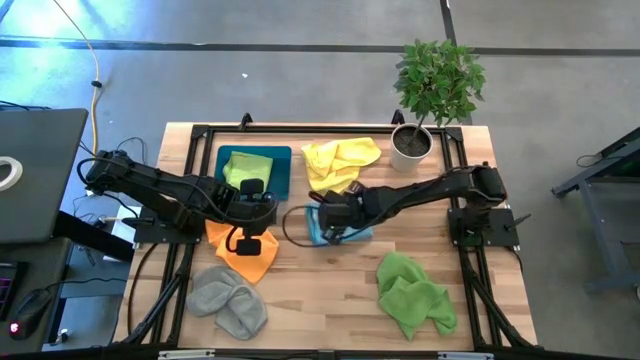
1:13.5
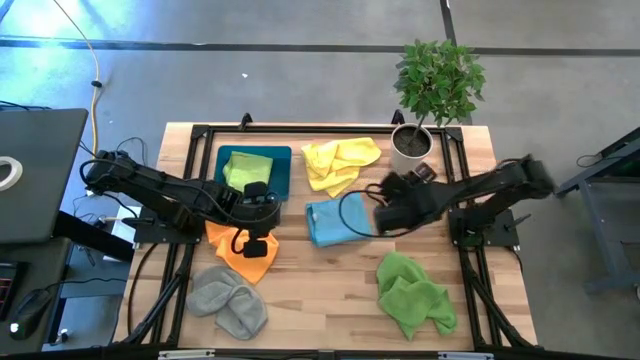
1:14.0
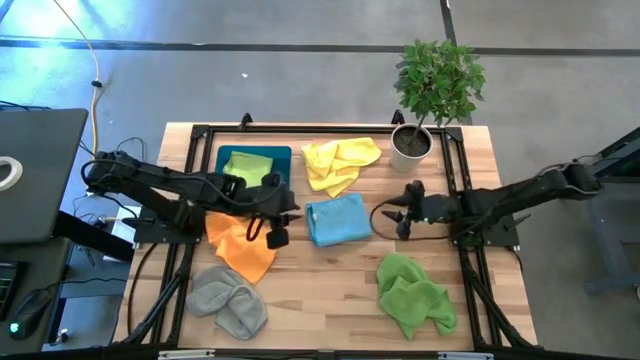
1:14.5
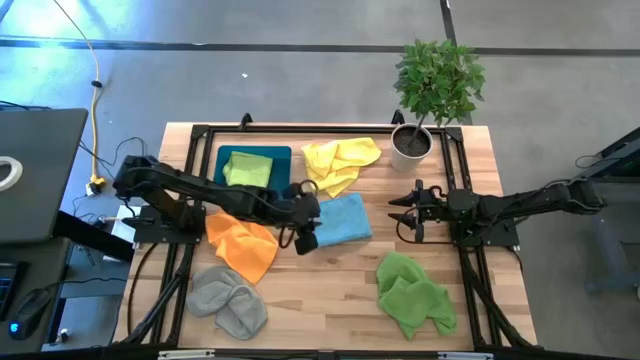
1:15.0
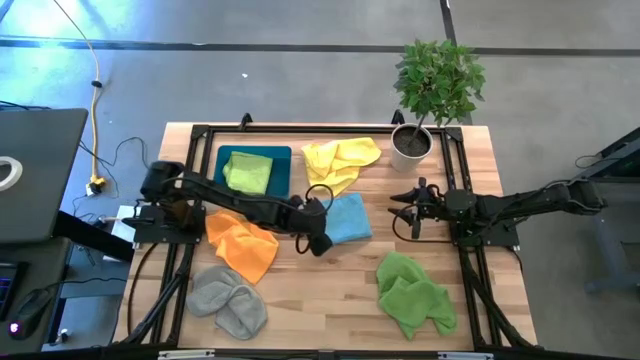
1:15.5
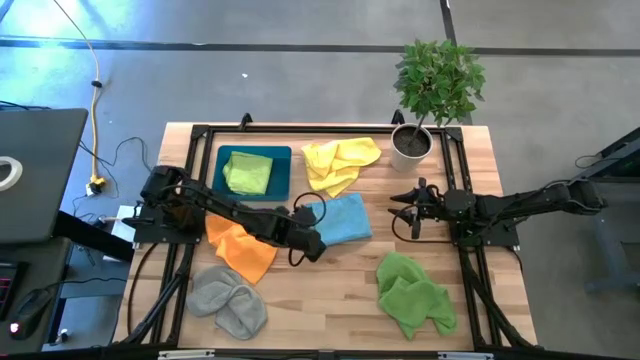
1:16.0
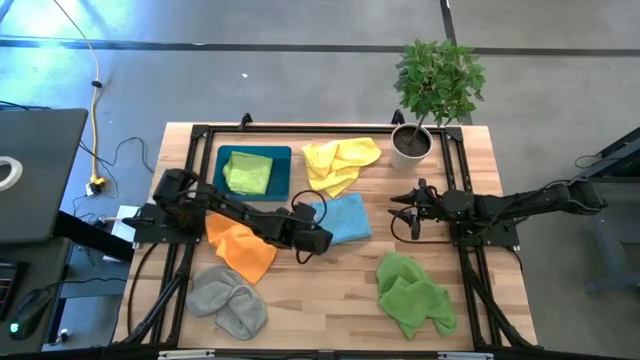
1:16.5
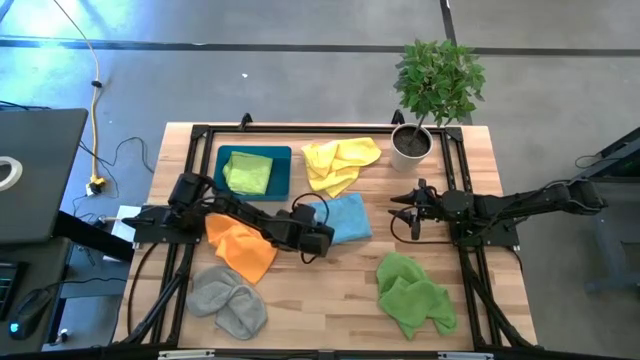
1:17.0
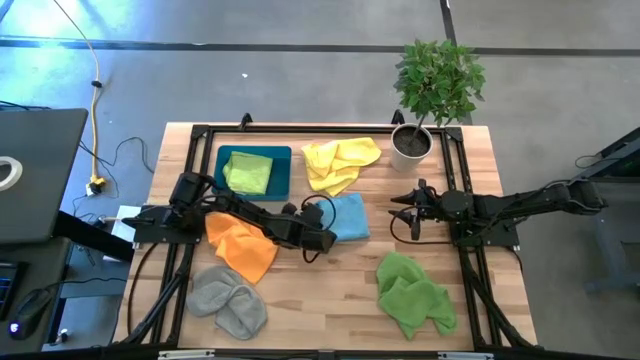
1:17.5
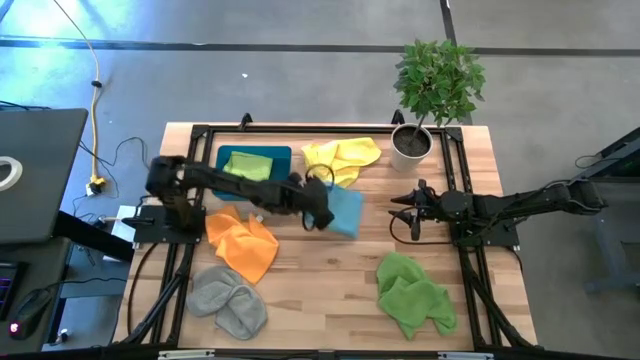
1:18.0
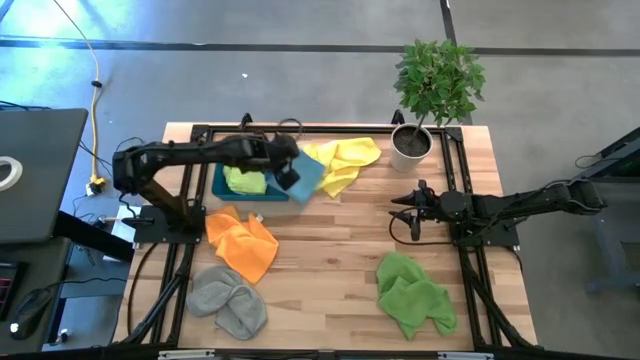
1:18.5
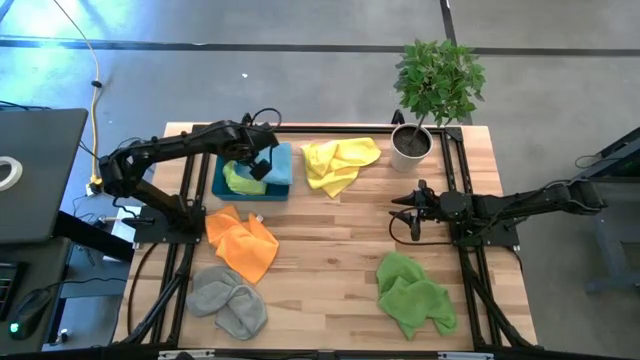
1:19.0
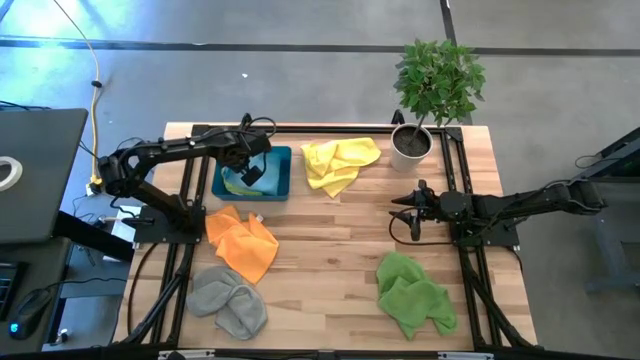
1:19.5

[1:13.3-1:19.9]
Task: Fold microfiber towels
Put the folded blue microfiber cloth into the blue bin

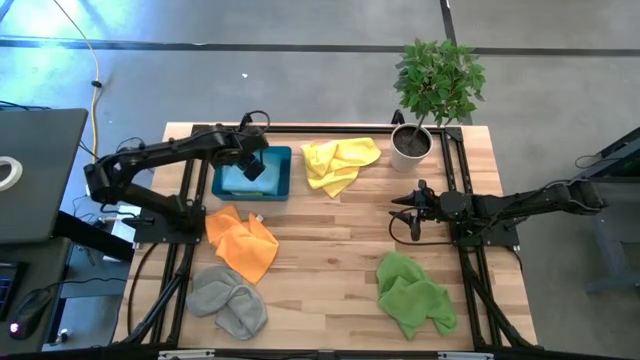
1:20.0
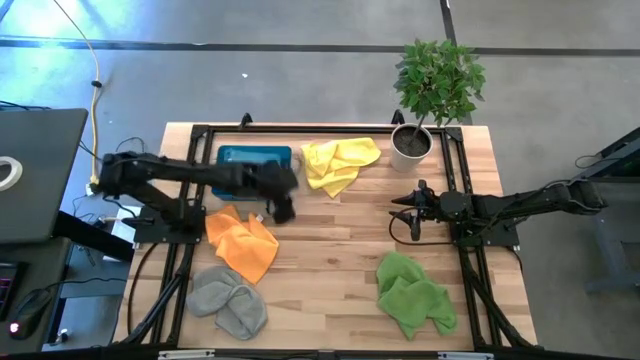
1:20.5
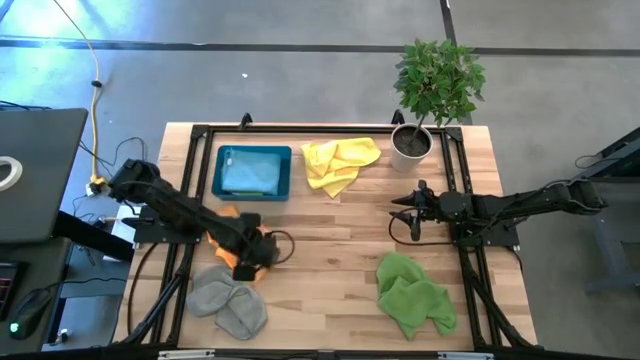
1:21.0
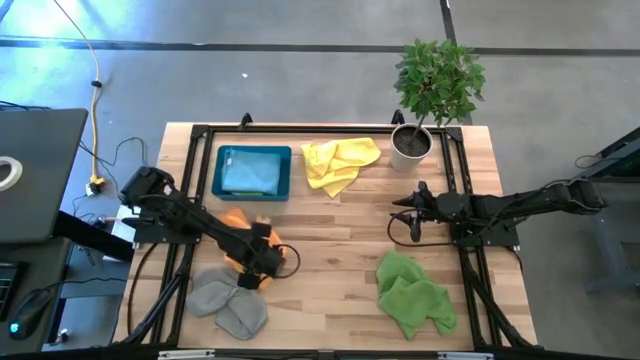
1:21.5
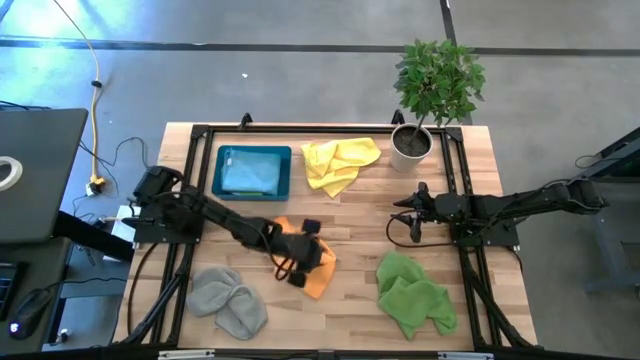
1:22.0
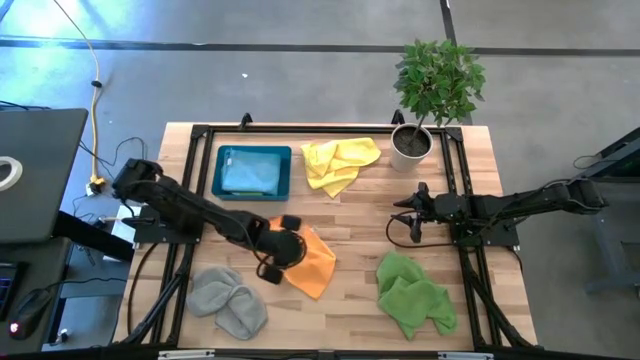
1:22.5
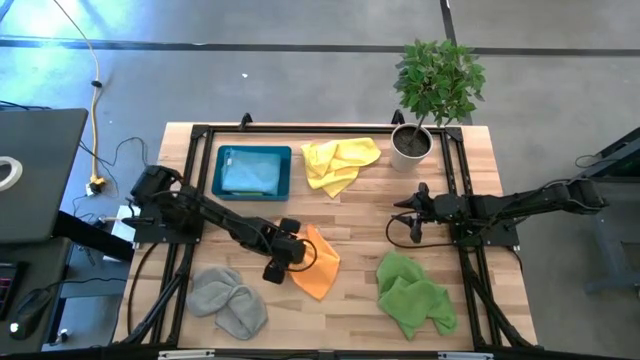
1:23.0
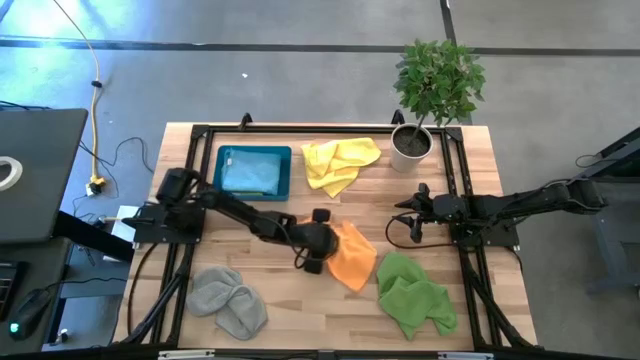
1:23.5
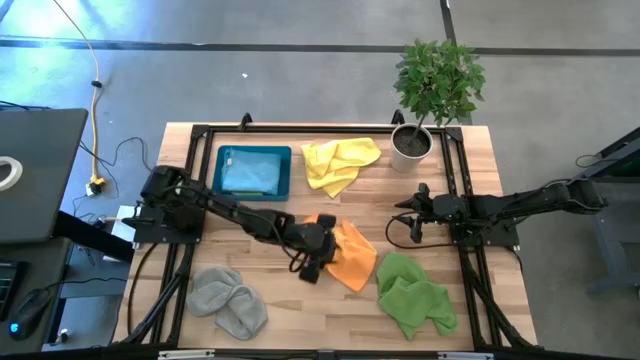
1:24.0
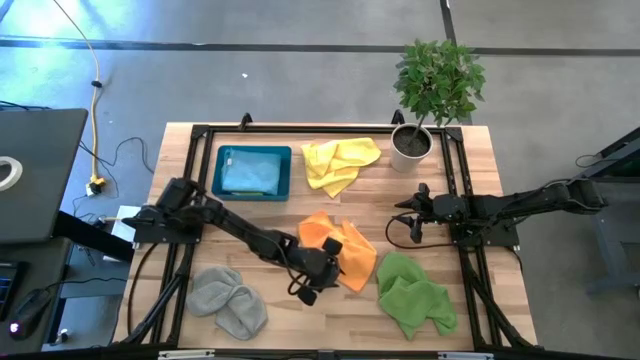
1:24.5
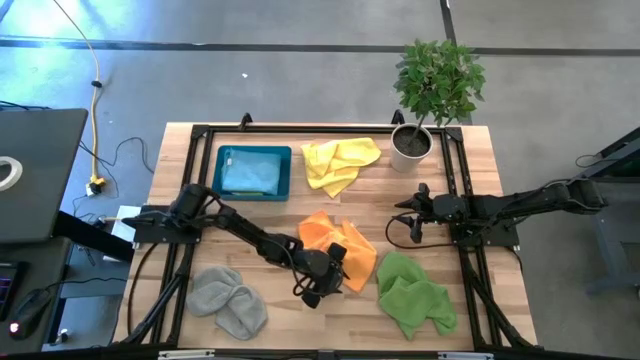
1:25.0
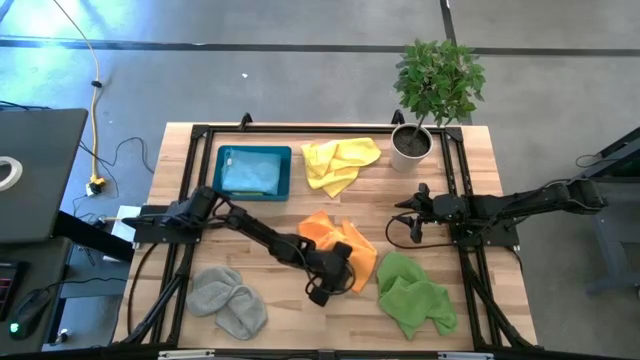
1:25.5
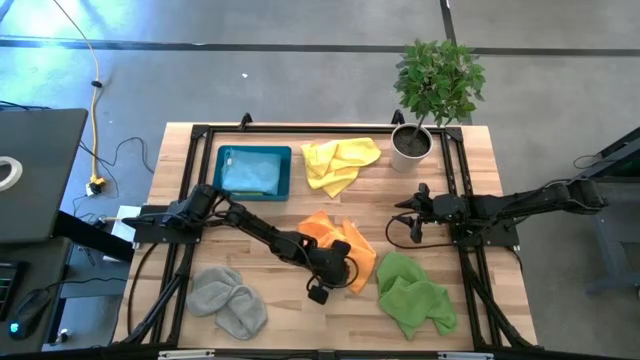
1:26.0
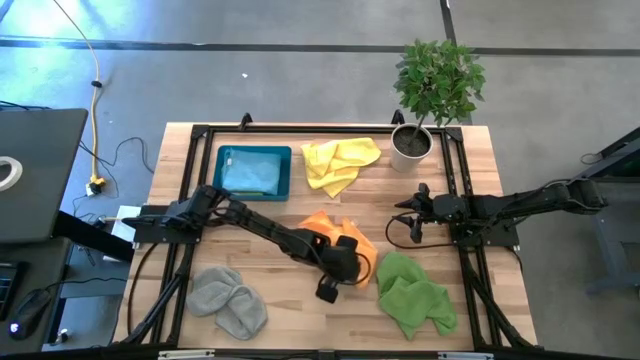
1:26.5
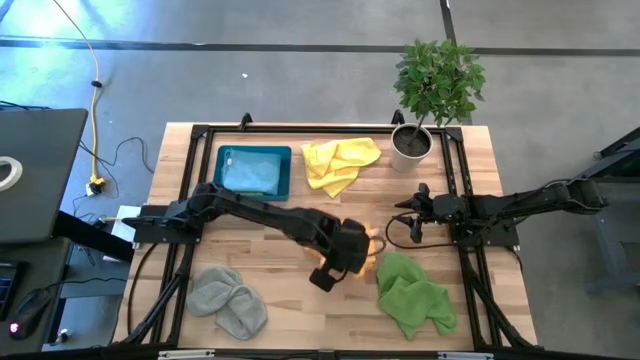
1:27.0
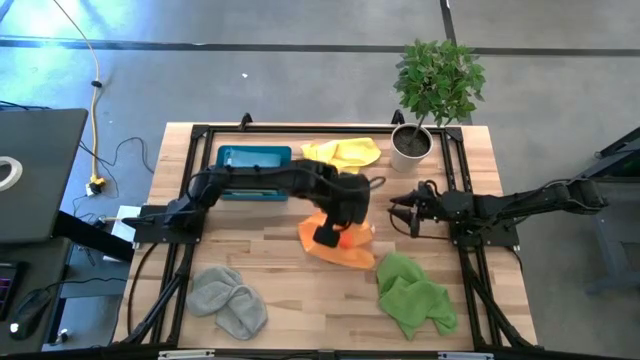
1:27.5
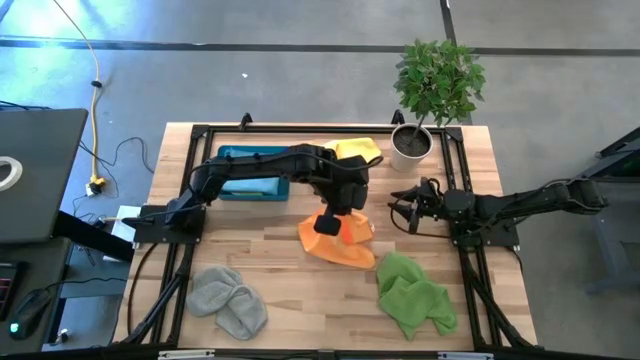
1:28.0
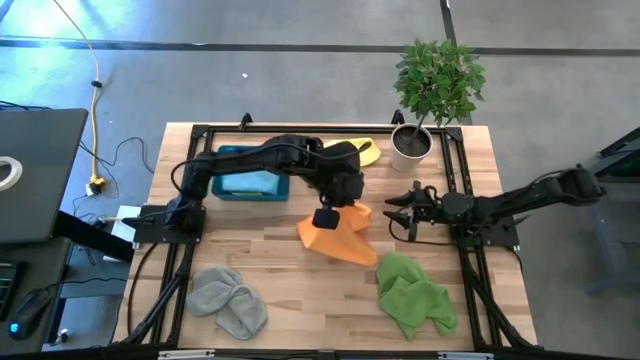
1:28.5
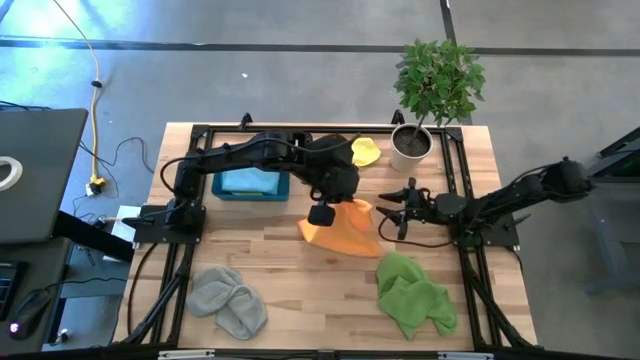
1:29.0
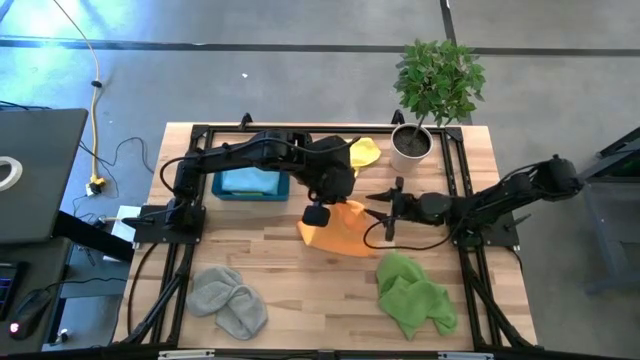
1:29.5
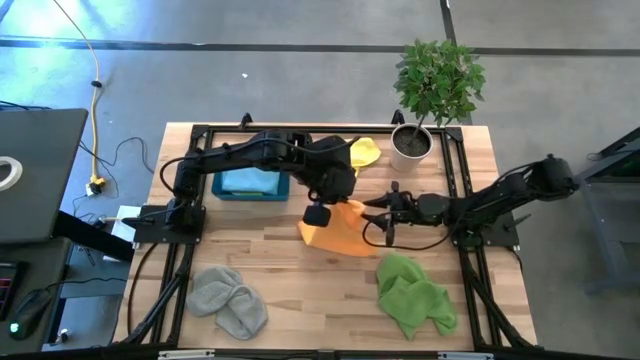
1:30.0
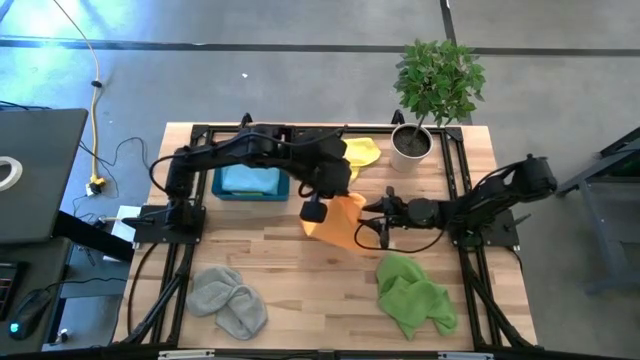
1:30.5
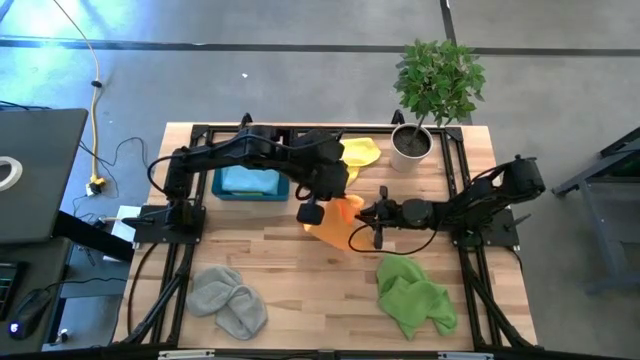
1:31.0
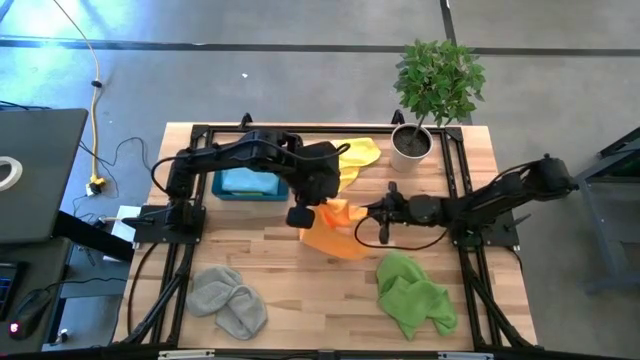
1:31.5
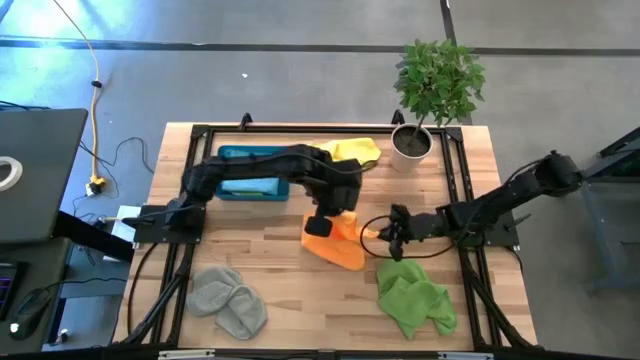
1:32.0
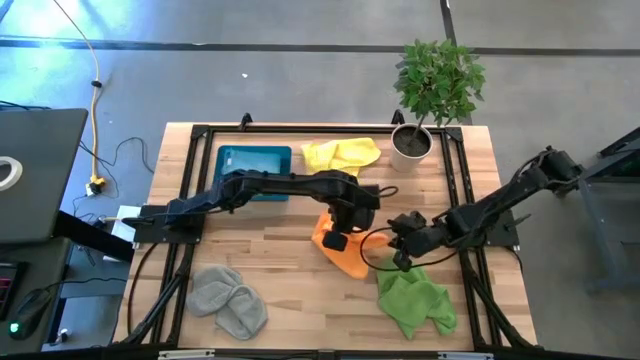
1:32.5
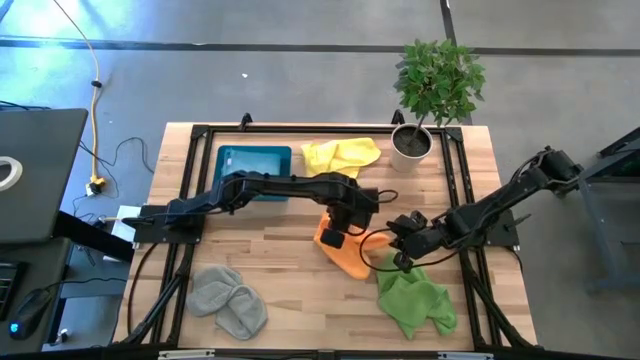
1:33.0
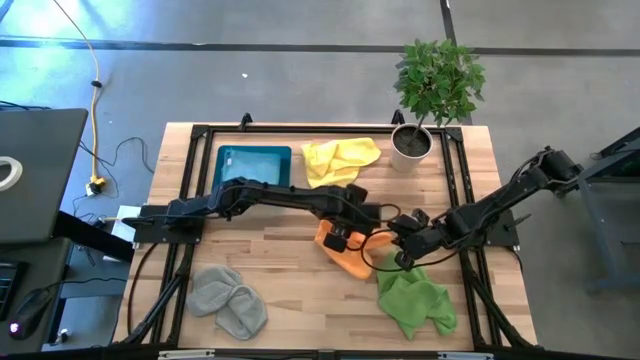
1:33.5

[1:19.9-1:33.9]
Fold the orange microfiber cloth

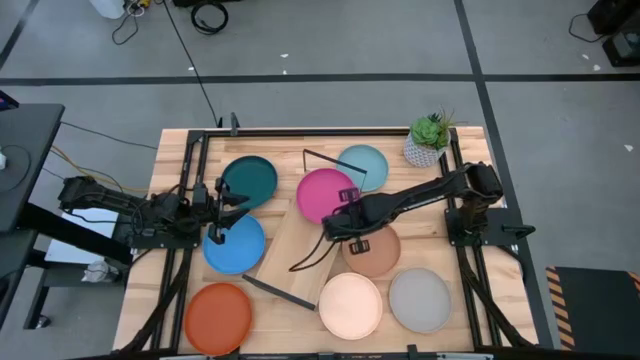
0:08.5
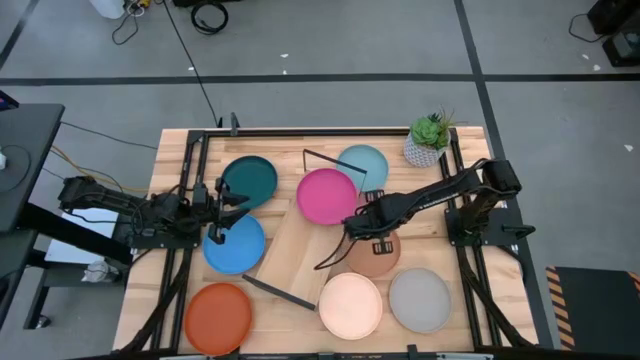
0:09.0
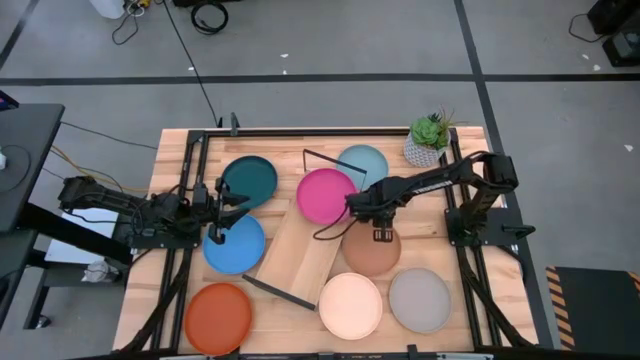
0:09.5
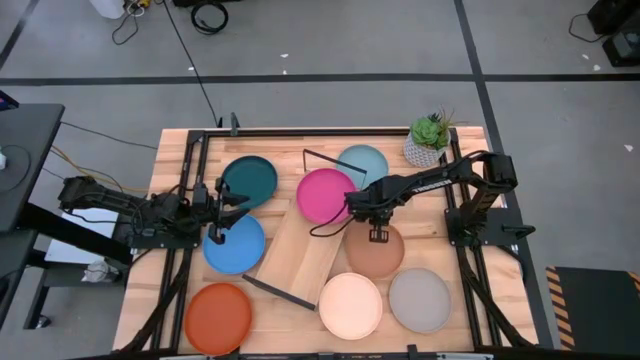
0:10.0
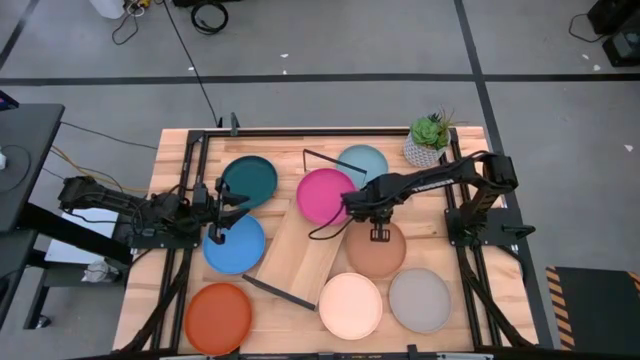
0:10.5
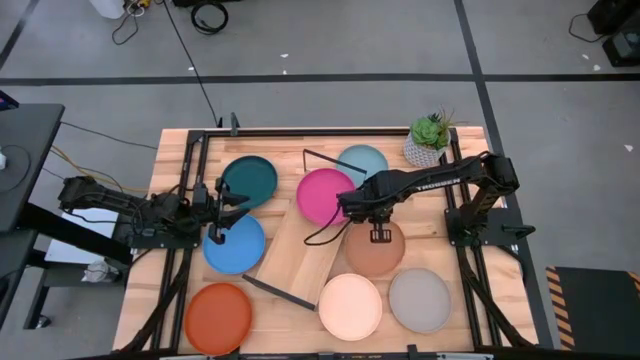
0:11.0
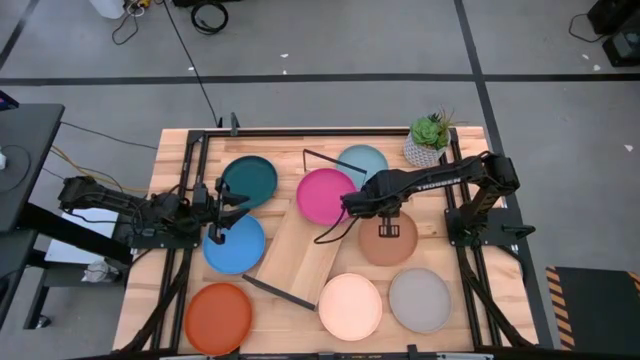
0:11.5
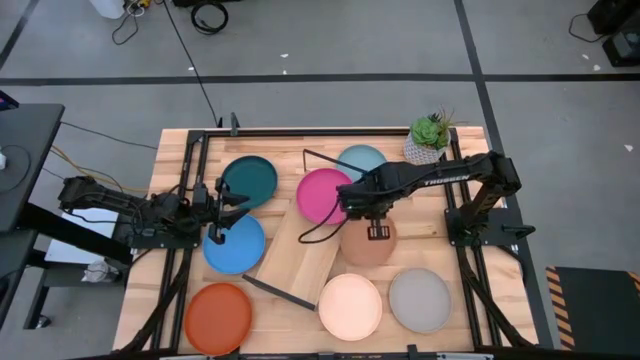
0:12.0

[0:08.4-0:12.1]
Task: Place and stack plates onto a shelf
Put the brown plate on the shelf
